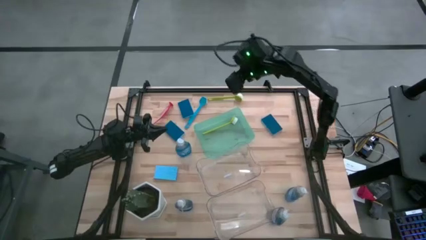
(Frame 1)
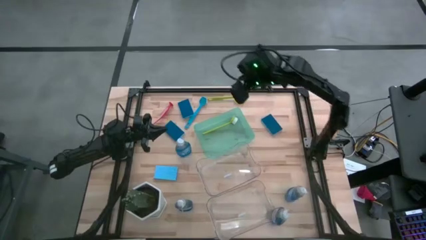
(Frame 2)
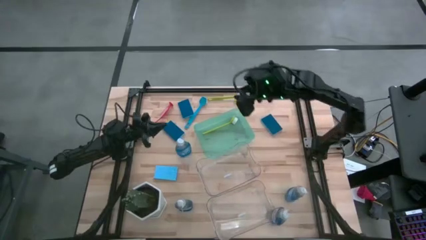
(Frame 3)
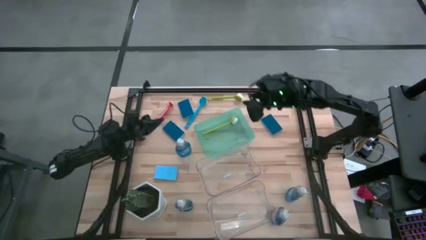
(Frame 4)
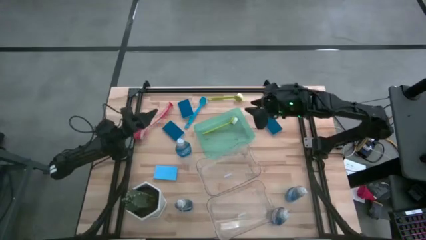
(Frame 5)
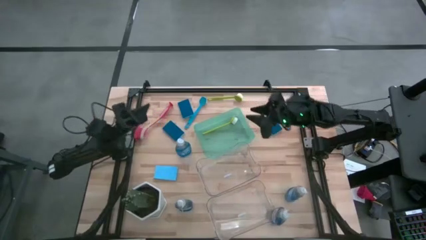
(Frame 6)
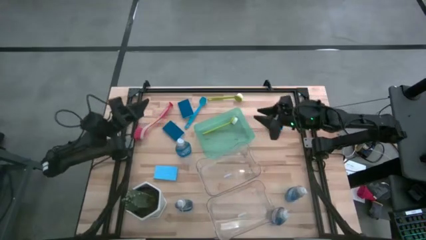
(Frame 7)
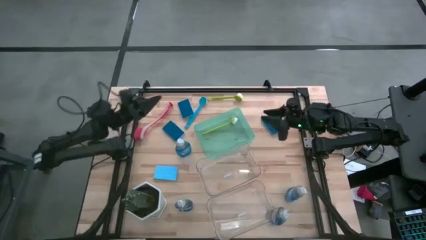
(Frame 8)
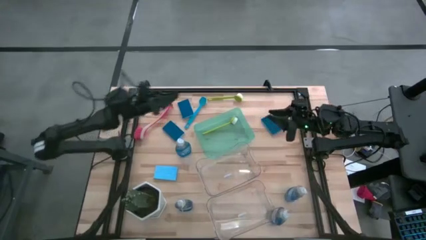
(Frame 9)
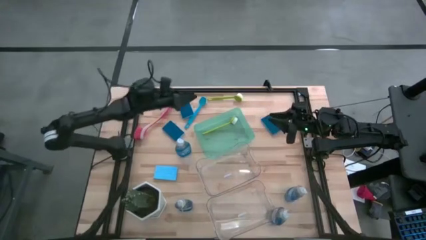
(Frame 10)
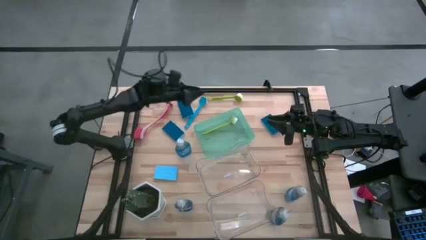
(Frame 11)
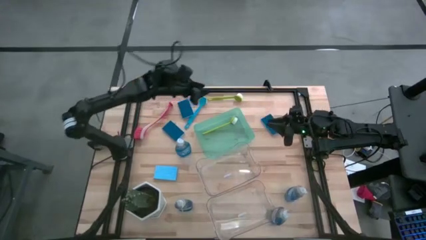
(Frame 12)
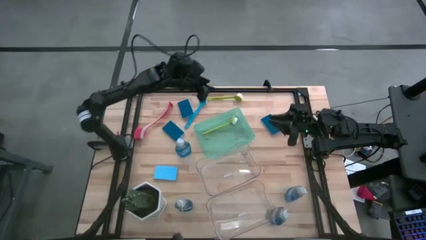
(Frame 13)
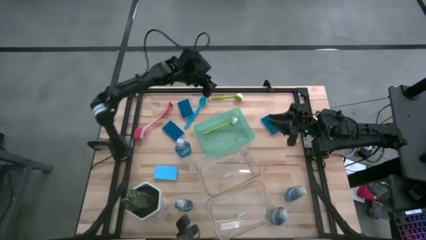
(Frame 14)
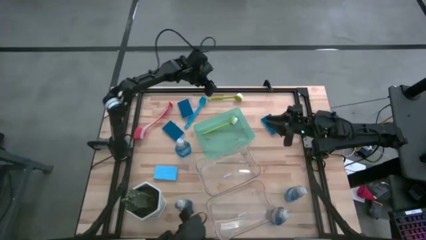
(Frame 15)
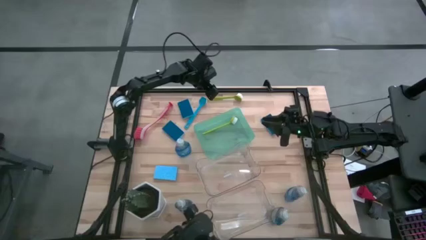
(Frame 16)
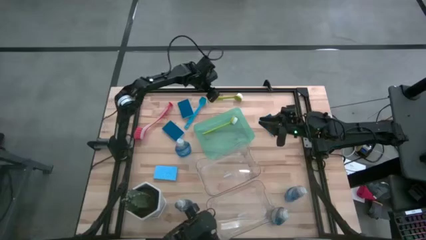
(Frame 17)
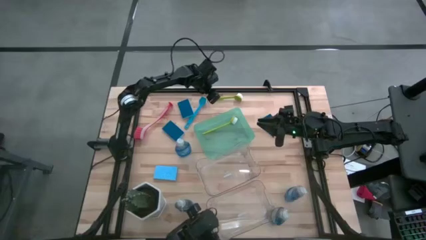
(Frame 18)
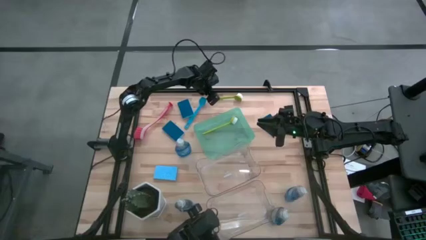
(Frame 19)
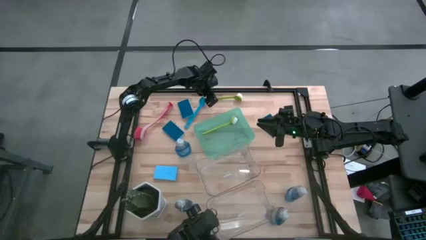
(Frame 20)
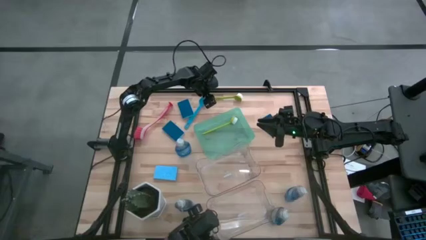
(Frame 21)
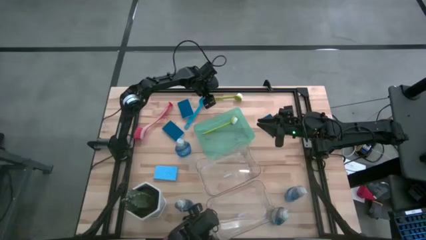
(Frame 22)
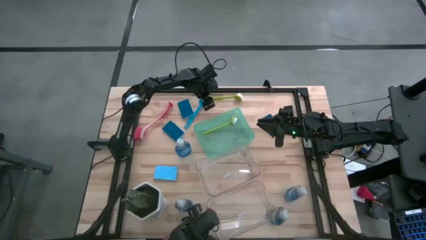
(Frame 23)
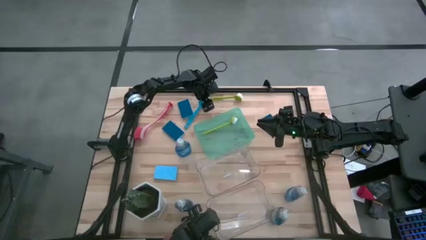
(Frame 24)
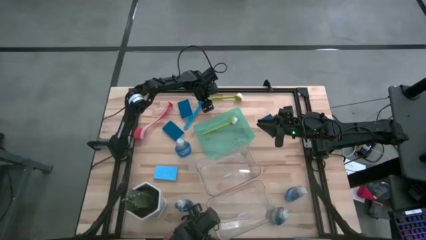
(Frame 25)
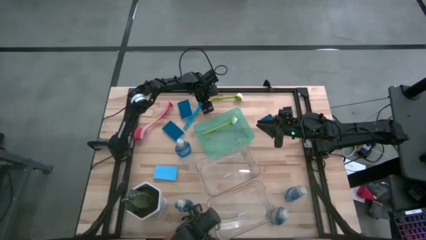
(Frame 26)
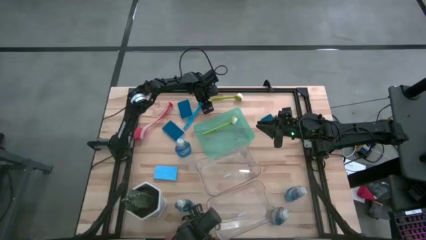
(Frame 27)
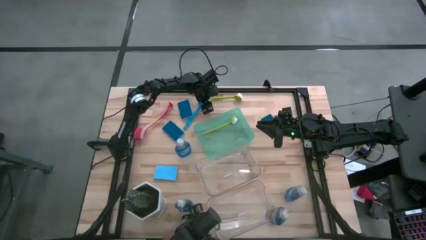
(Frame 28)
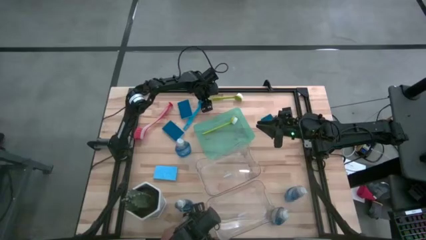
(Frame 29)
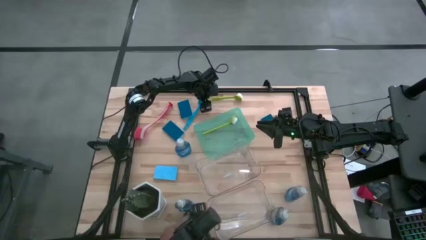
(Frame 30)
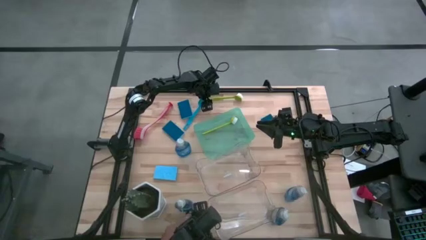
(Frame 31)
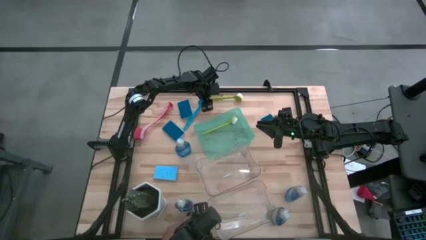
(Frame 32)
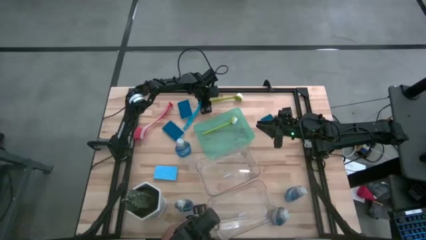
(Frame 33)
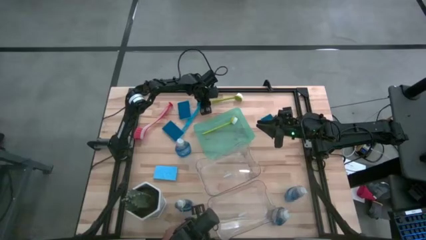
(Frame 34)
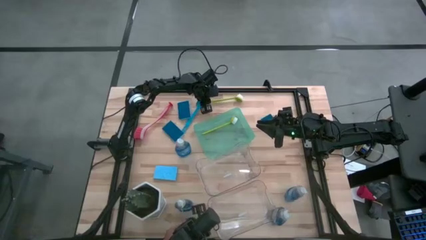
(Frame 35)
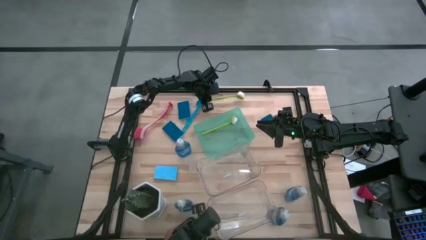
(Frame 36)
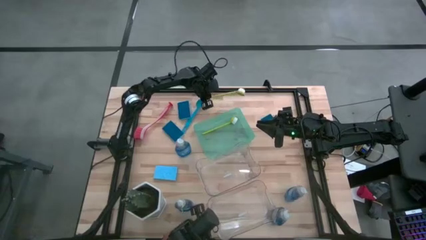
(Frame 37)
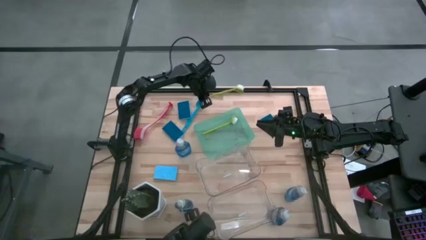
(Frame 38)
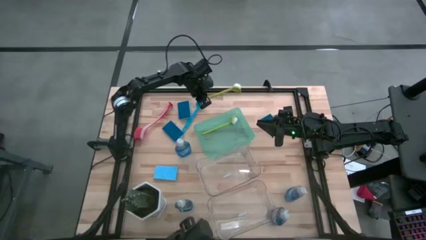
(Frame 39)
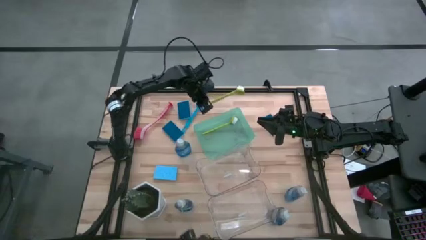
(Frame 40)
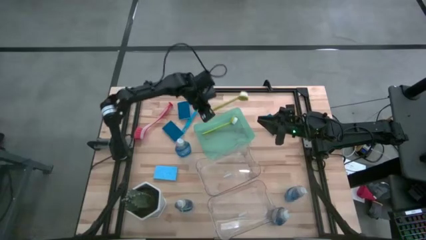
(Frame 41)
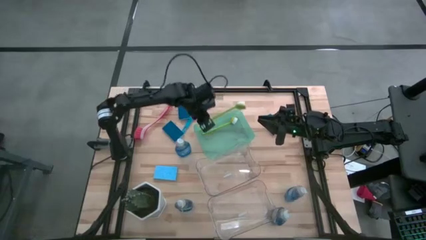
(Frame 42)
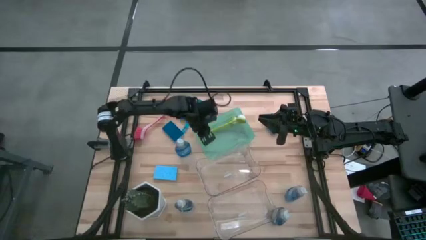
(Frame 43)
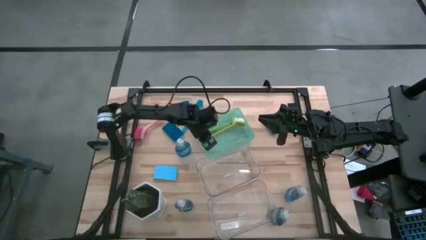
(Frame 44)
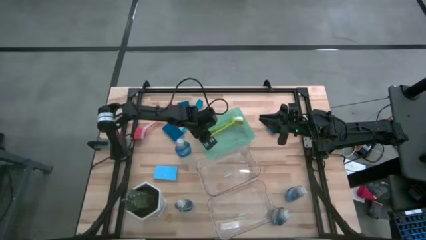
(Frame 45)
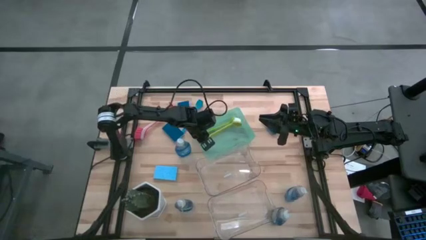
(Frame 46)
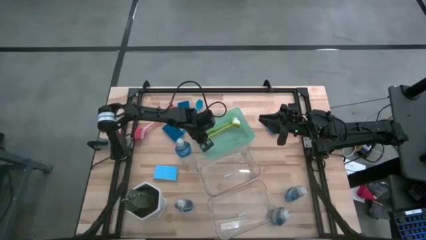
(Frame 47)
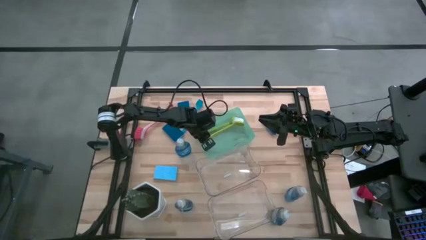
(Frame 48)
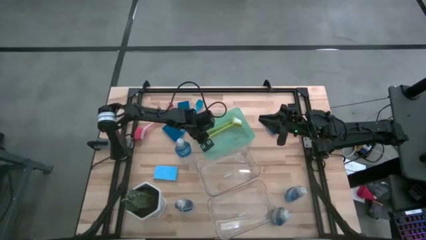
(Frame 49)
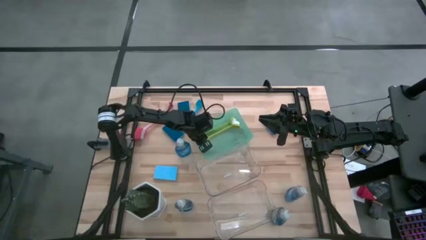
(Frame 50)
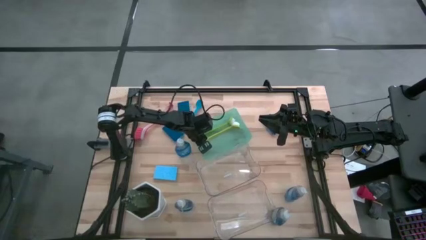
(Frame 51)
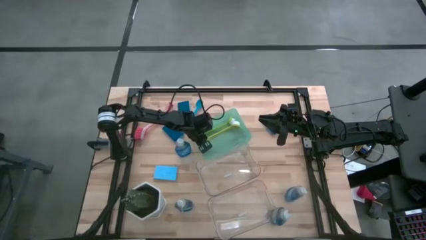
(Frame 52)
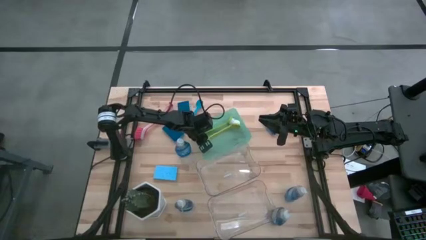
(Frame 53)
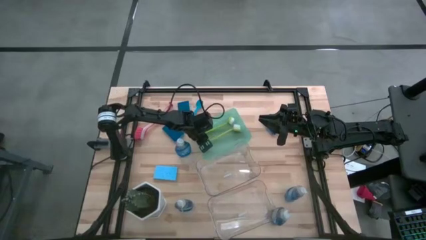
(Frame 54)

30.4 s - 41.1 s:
Task: Pick & Place Kitchen Sink Supplies
Put the green dish brush into the teal bin

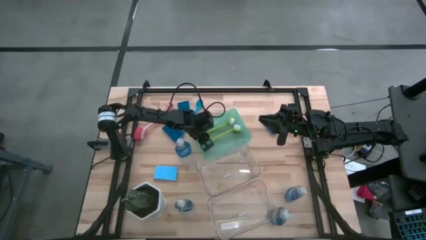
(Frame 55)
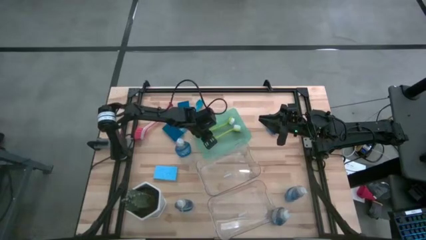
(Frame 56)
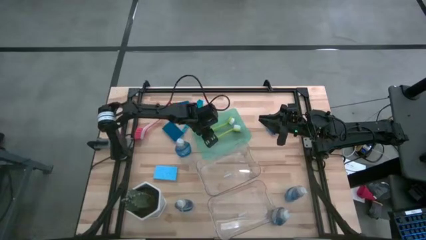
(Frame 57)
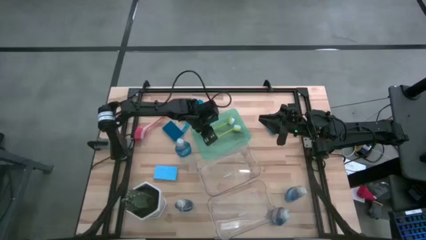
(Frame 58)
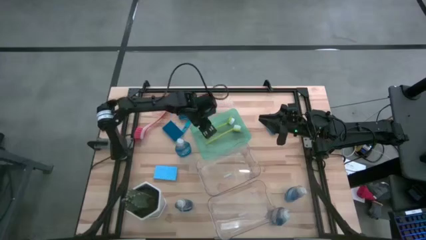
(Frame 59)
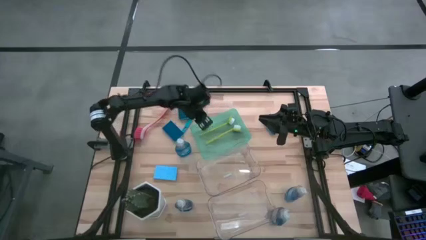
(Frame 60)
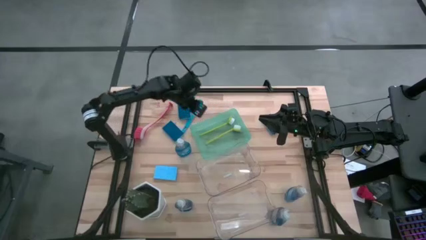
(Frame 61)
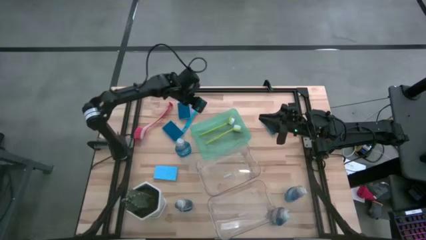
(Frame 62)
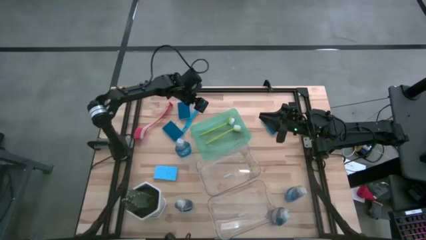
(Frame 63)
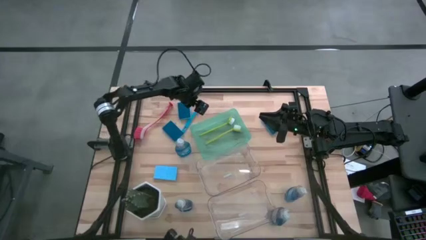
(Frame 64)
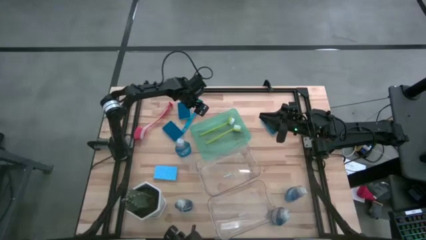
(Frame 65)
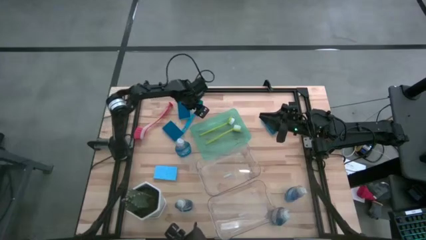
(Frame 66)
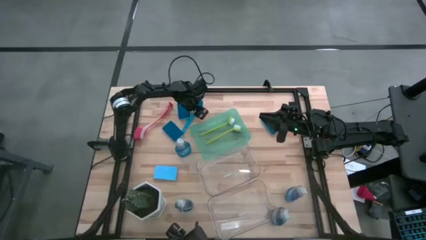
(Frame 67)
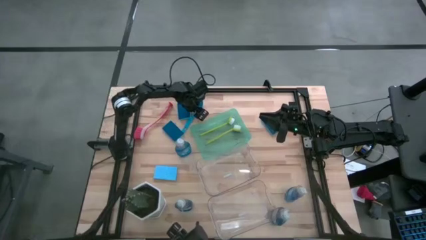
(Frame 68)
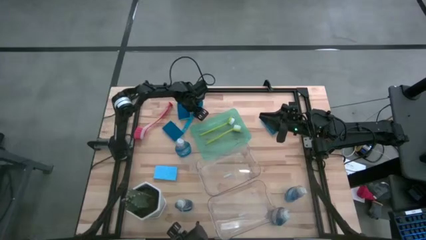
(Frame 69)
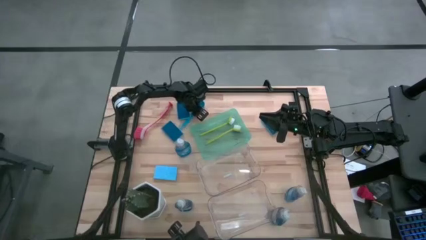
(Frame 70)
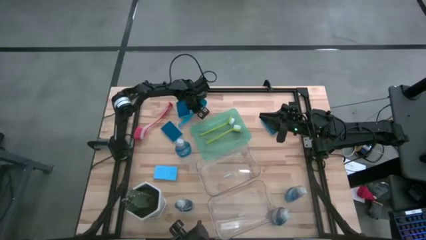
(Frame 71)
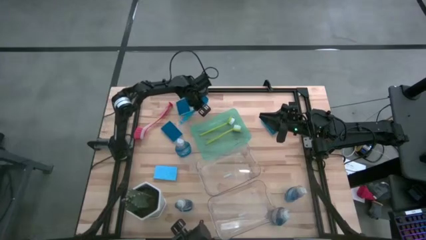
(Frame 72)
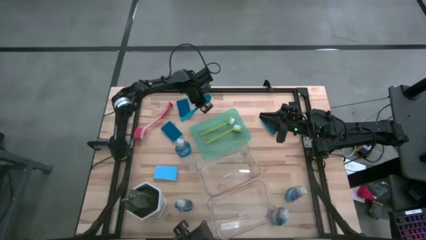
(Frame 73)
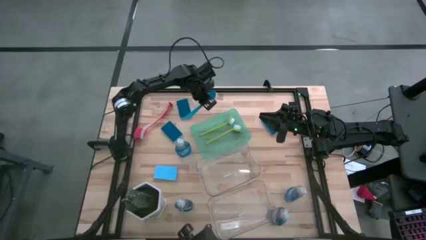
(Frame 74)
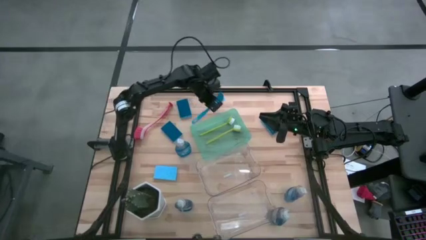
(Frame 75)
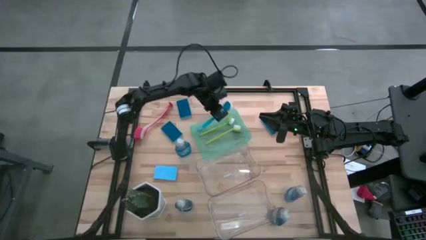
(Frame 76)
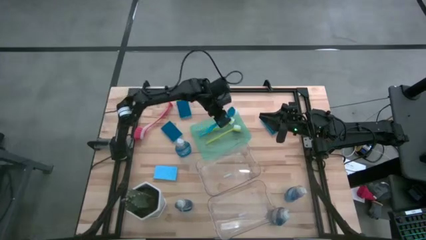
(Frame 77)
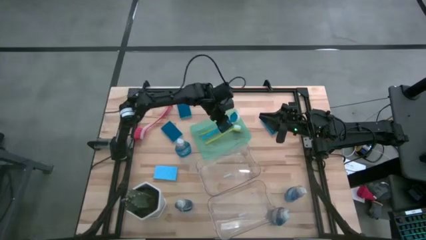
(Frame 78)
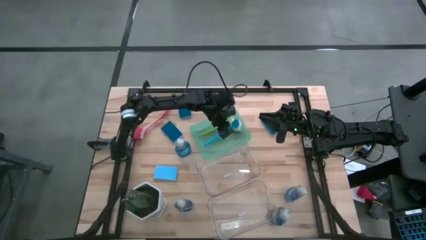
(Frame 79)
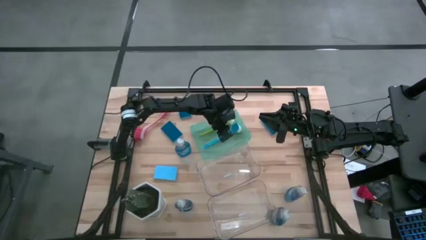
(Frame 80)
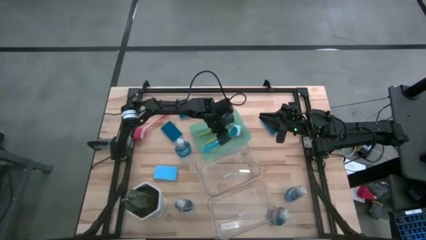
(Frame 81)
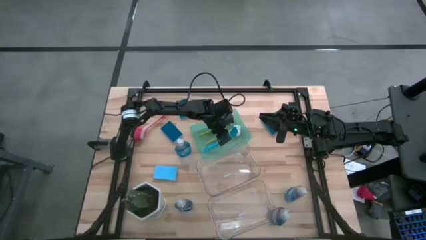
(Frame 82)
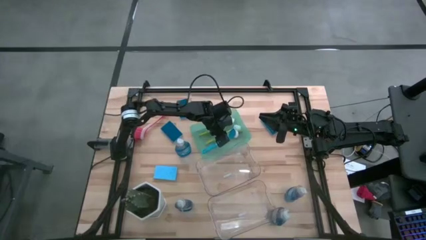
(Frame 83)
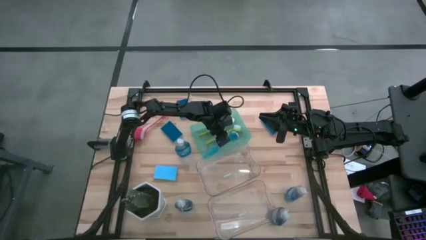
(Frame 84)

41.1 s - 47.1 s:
Put the blue dish brush into the teal bin

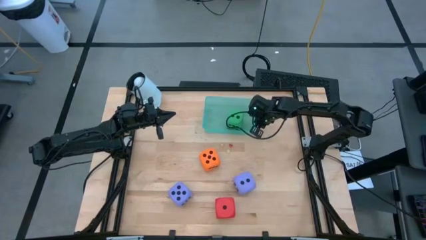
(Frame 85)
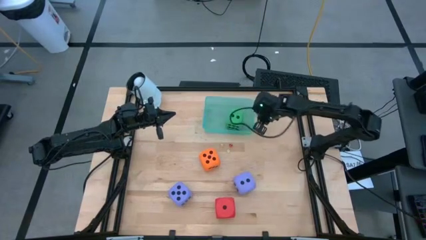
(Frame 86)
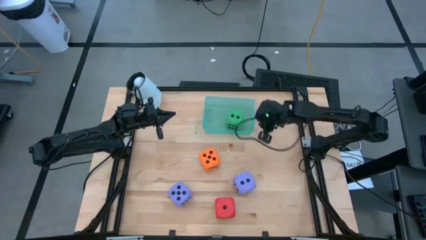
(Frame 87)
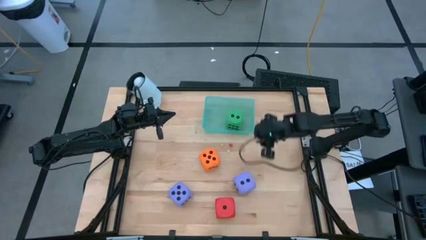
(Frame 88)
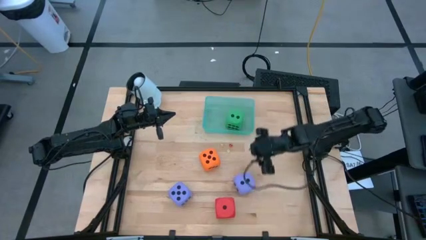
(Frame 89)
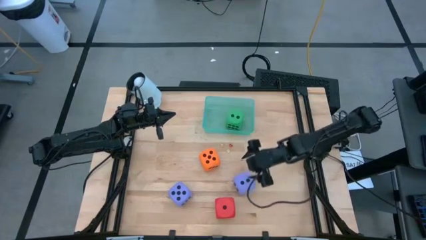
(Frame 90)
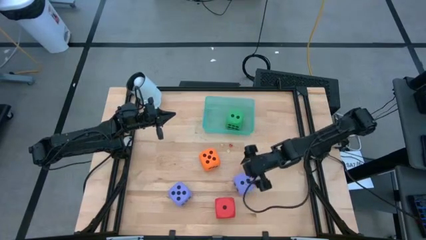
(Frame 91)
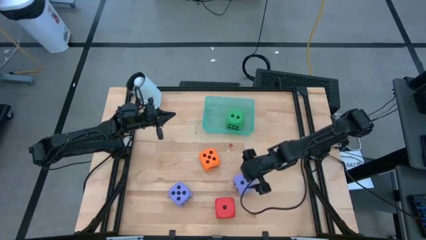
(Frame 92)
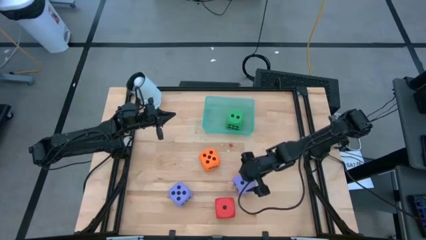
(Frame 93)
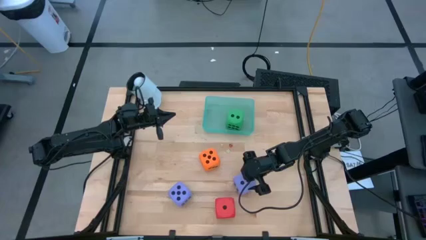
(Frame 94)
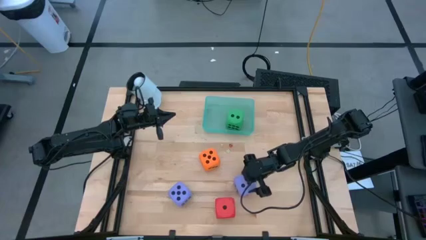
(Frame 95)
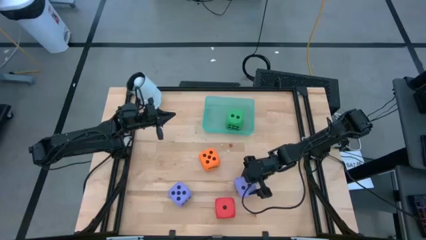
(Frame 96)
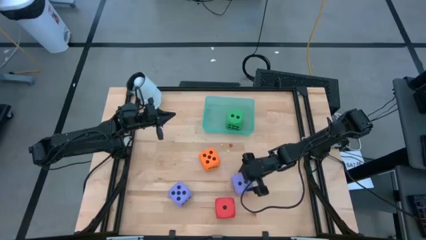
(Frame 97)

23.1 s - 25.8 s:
Task: Pick & Place Dice
Put the large right purple dice into the light blue bin
